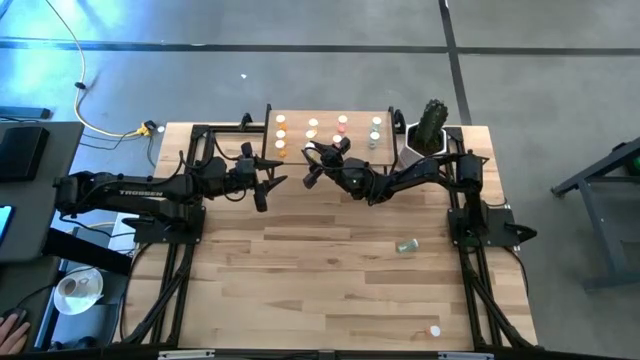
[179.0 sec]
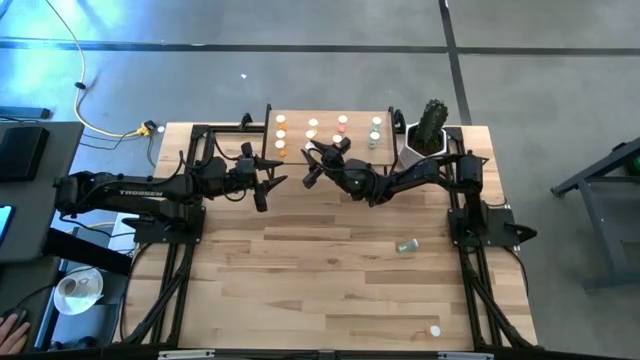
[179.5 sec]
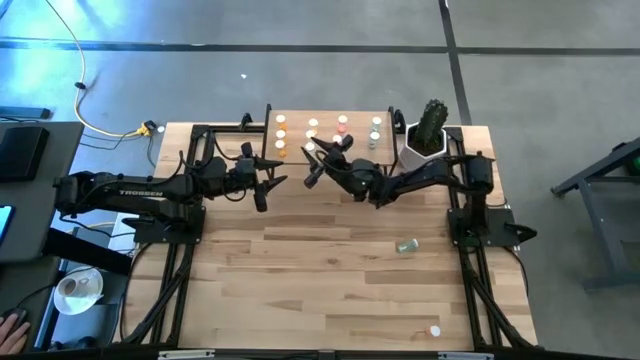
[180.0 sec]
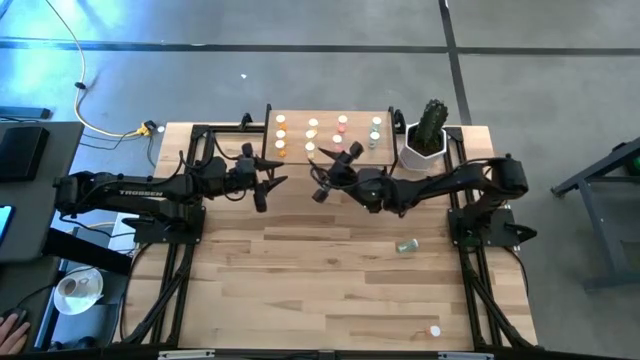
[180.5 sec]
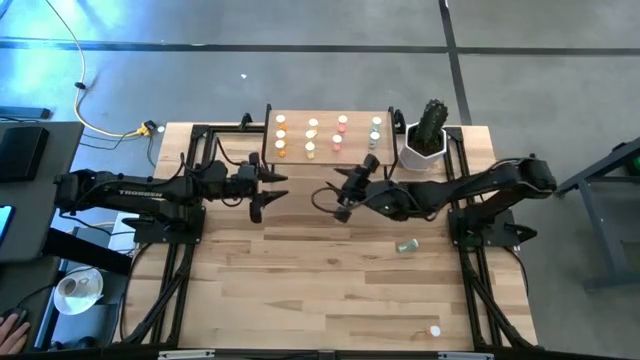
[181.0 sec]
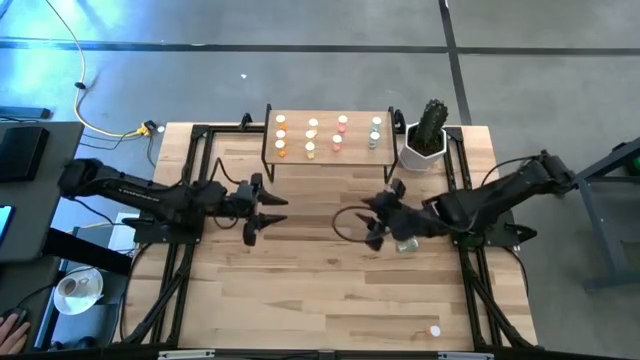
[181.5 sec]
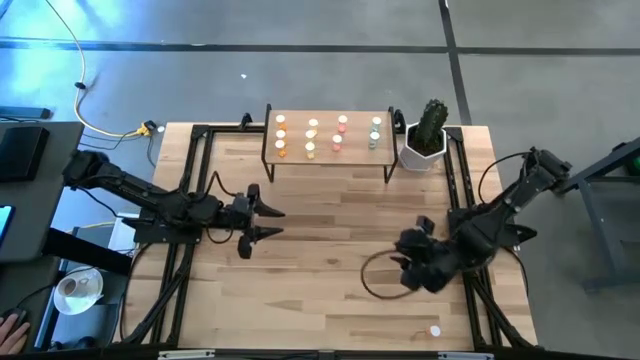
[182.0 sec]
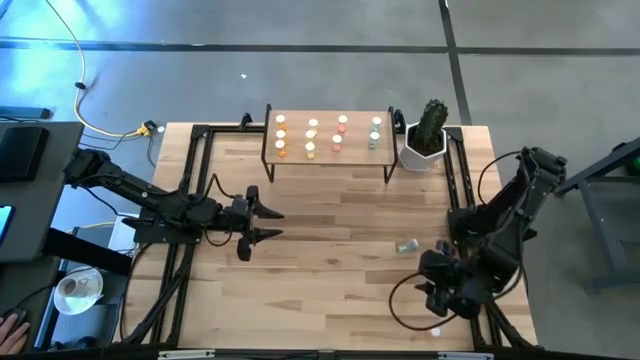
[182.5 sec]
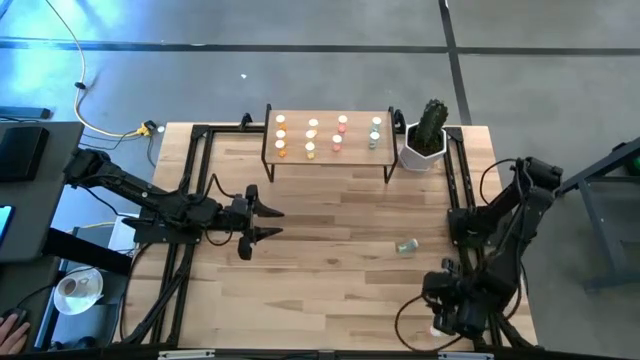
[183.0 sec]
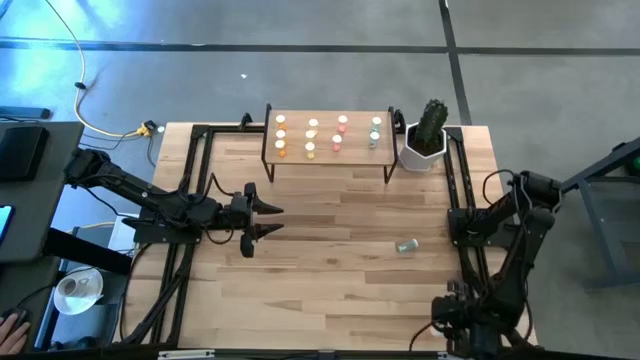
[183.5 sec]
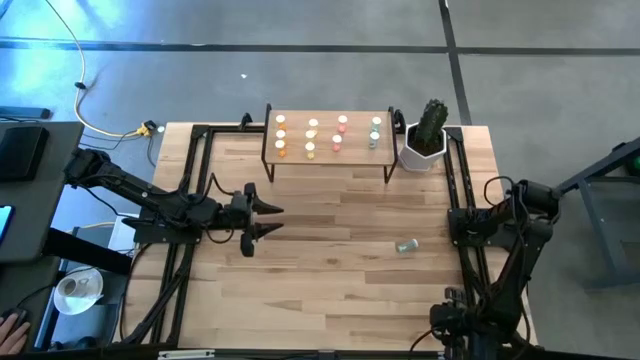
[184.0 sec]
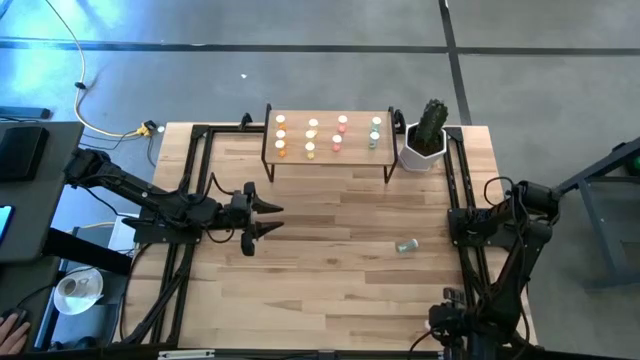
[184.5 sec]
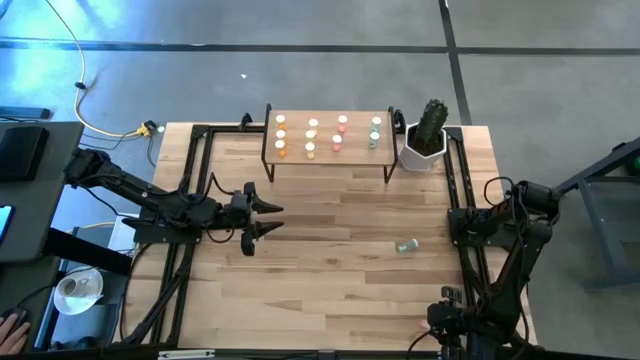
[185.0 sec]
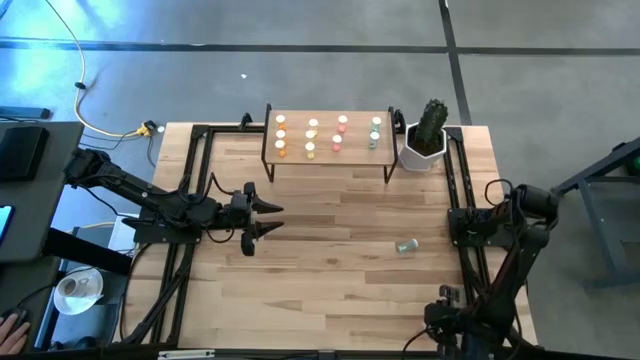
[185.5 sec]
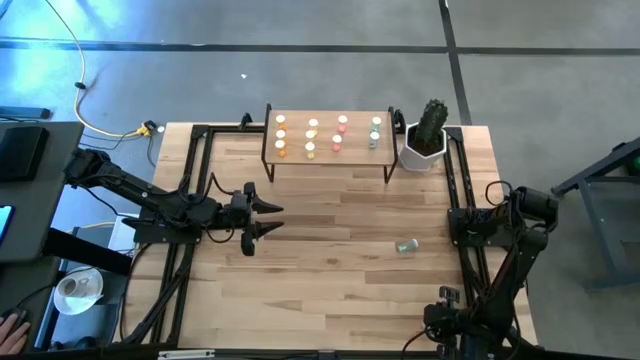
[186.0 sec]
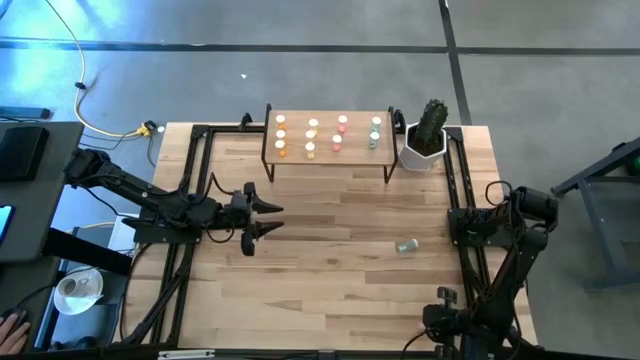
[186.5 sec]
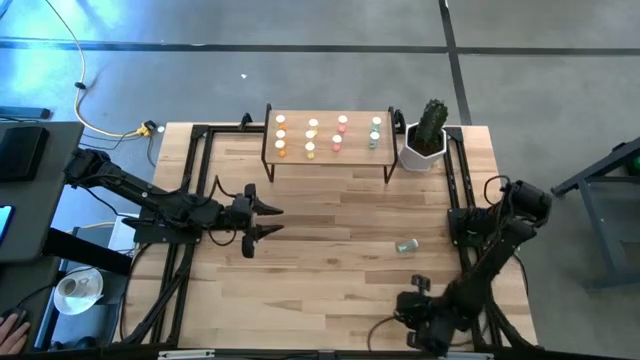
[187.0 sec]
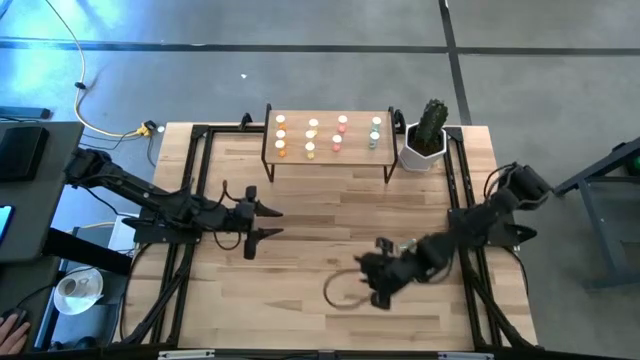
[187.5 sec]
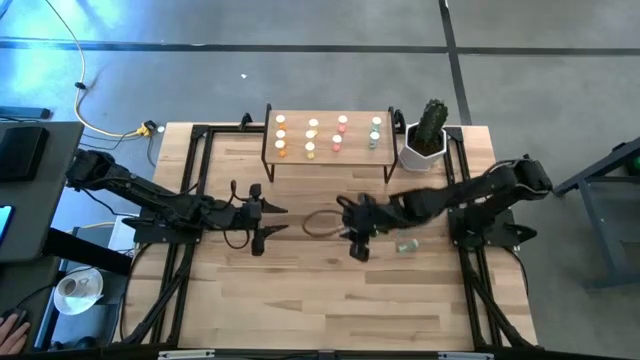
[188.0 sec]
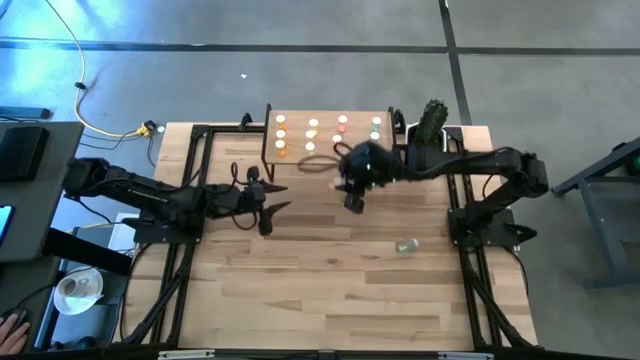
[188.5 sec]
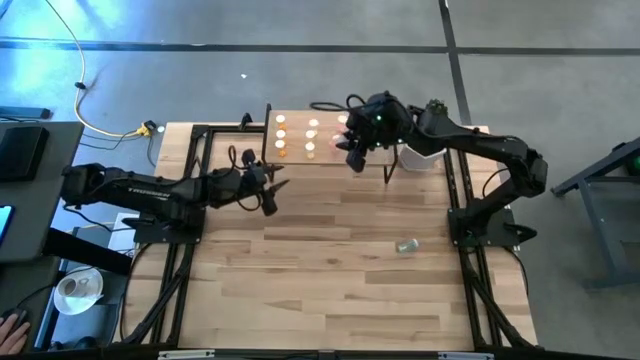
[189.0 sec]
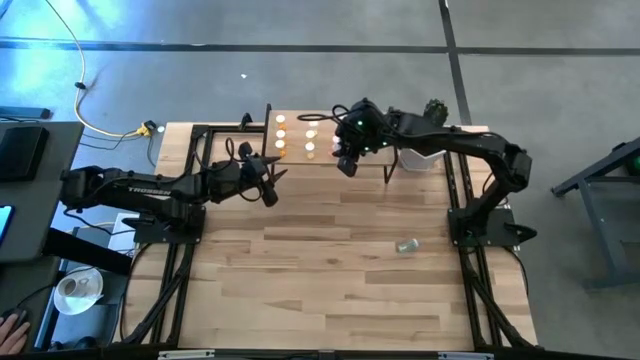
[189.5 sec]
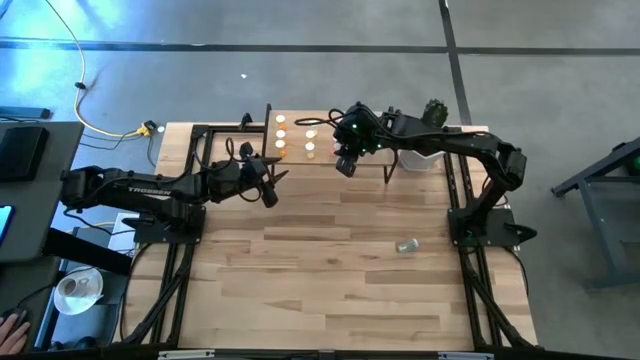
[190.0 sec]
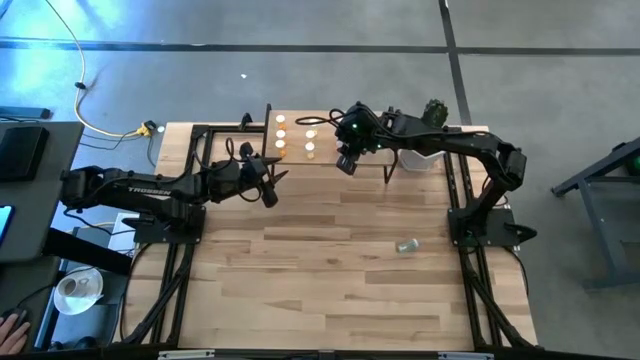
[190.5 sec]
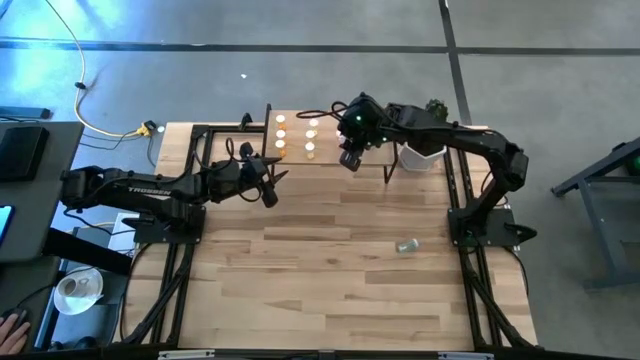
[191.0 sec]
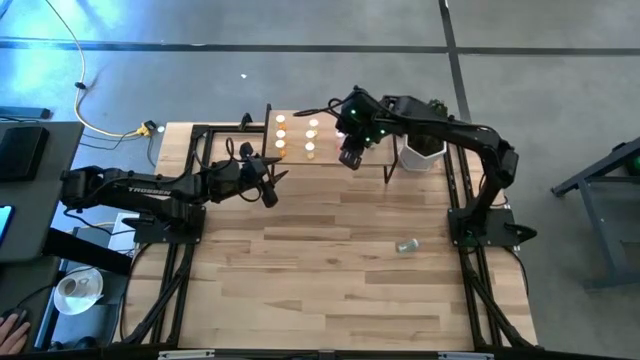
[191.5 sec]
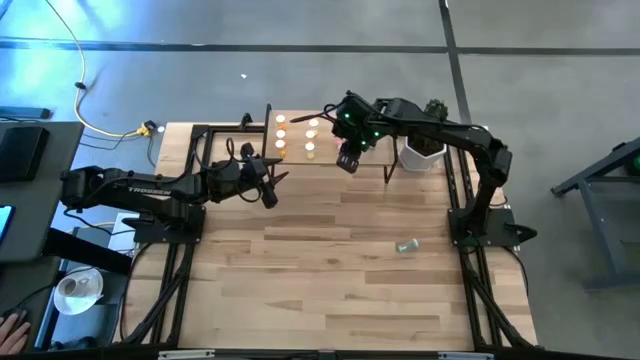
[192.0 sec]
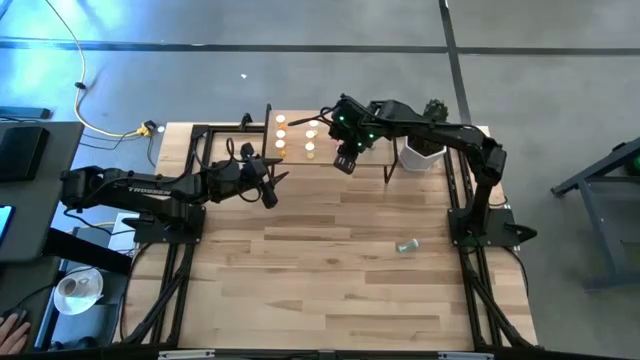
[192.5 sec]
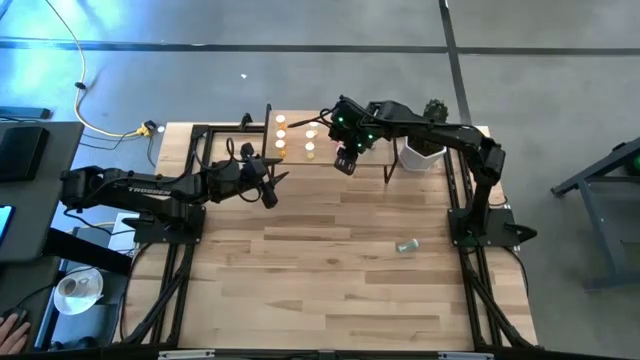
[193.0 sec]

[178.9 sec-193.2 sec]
Task: Pick and place medicine bottles onto shelf by color
Put the pink pill bottle on the shelf aligned with the other pink pill bottles

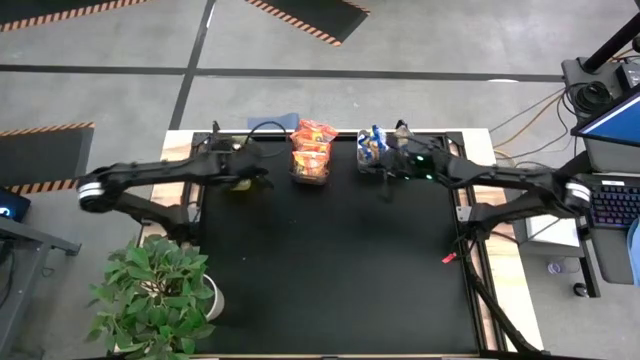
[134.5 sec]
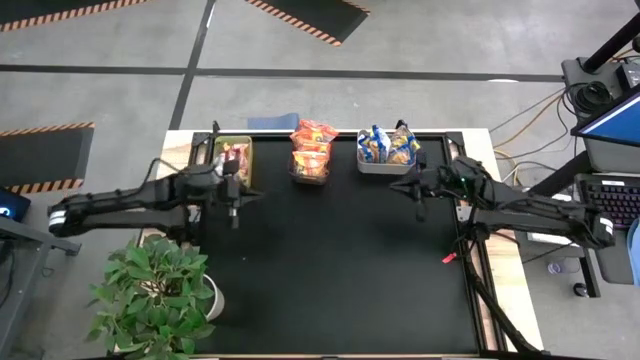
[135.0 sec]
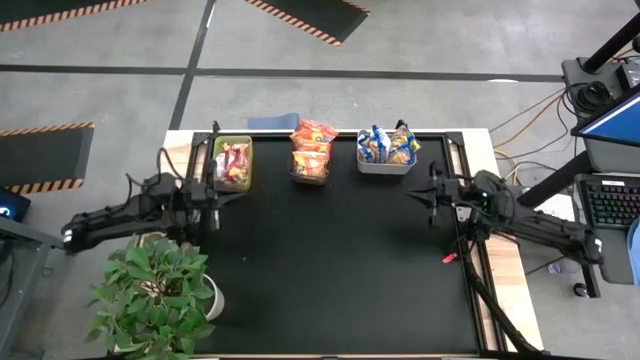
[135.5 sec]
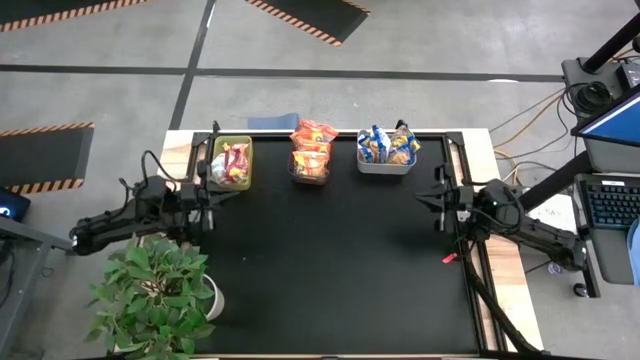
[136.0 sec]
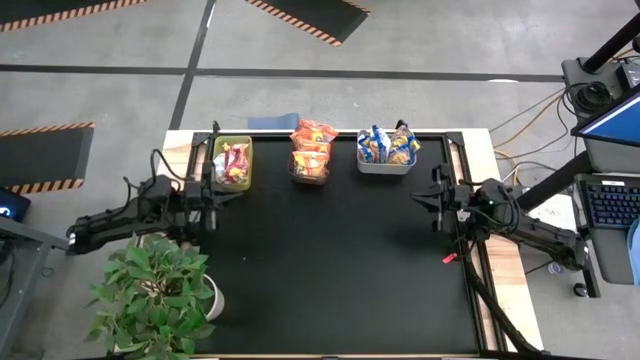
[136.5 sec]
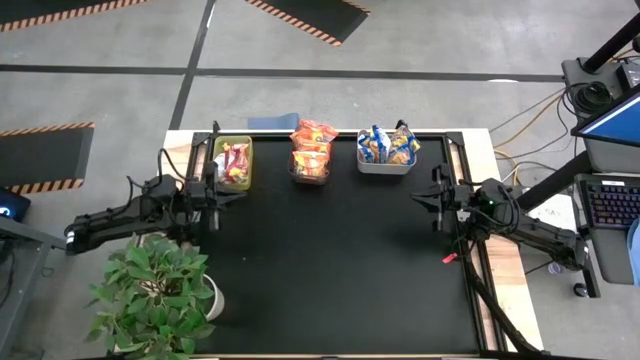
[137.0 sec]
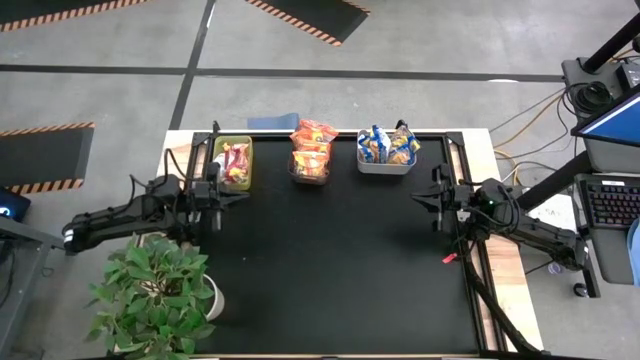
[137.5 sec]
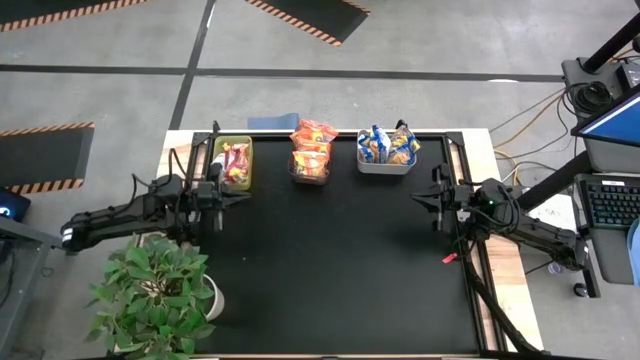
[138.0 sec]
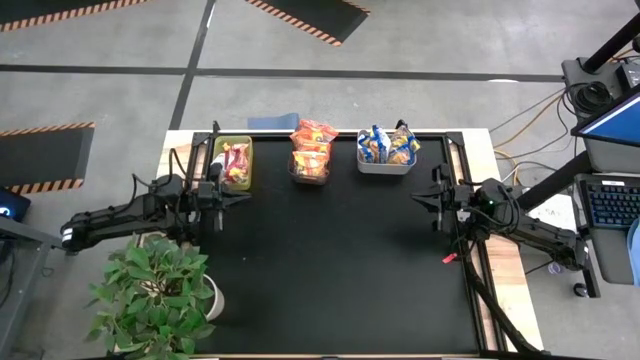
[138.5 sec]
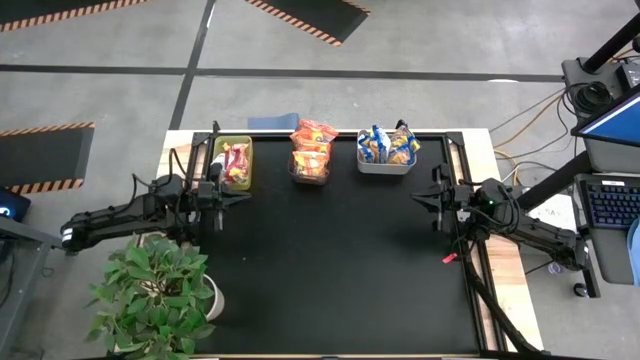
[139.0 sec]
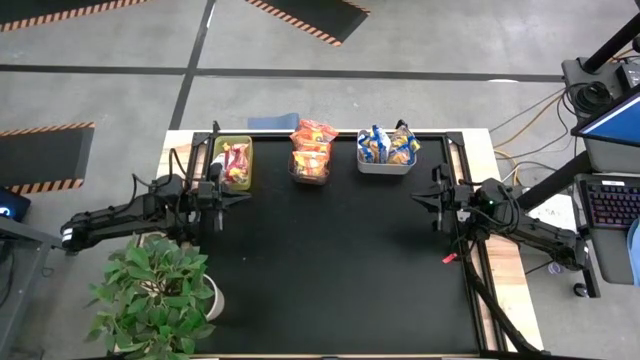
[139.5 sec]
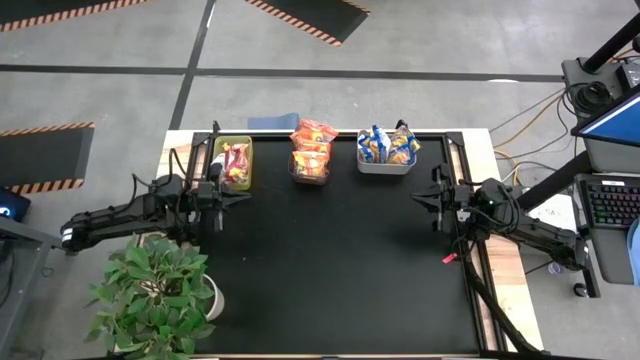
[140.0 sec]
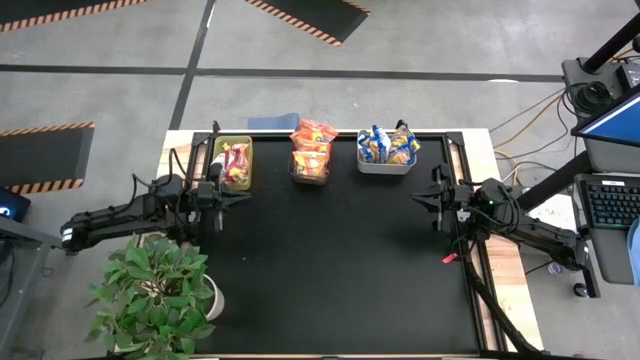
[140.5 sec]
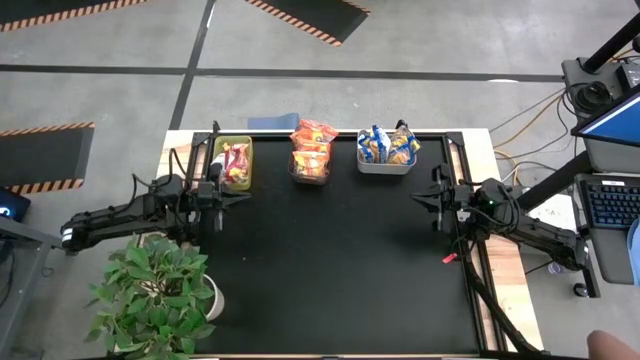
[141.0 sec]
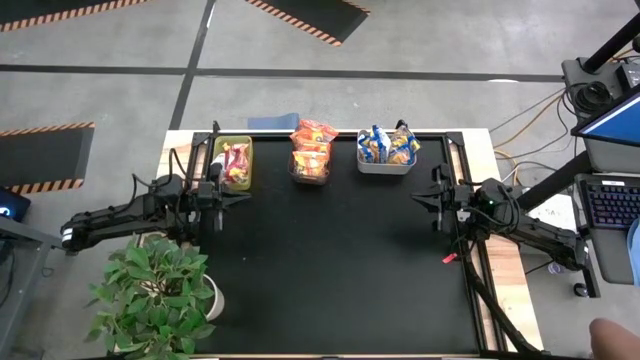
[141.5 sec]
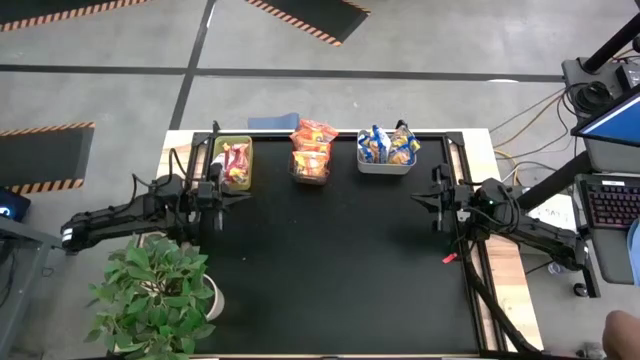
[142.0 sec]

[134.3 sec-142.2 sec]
Task: Sort Maruchan noodles
Return to Home Position
